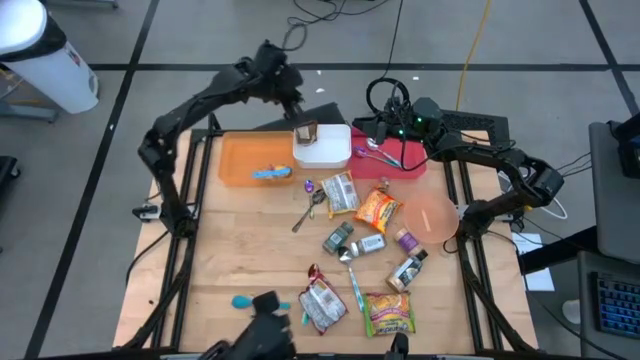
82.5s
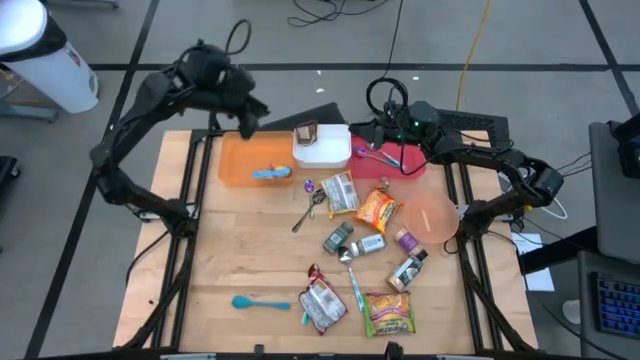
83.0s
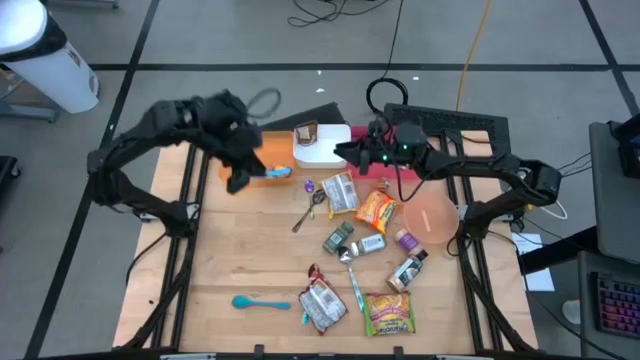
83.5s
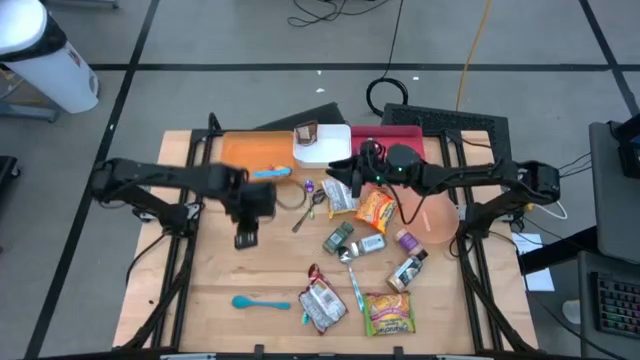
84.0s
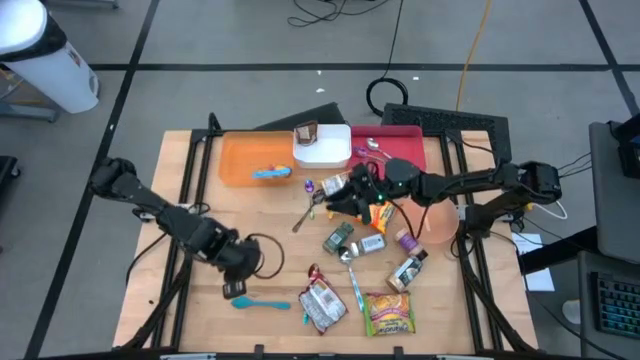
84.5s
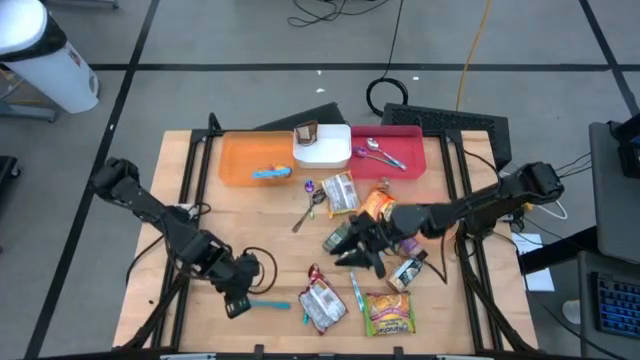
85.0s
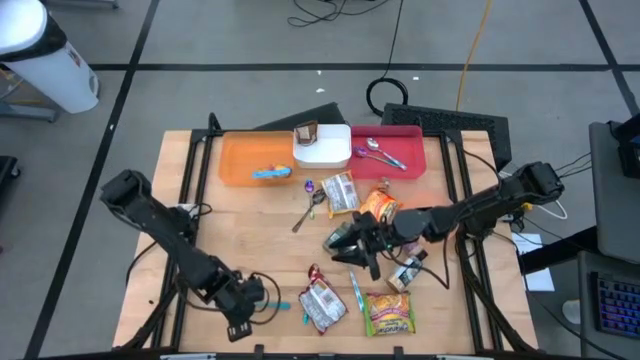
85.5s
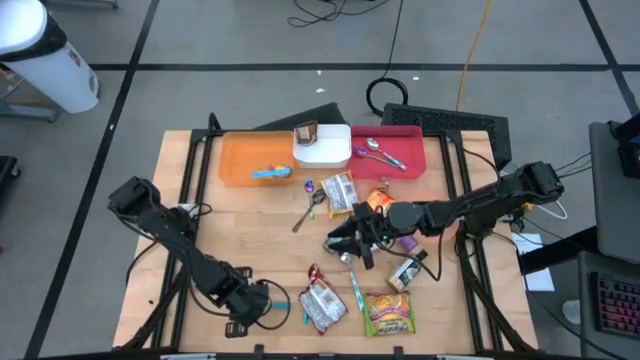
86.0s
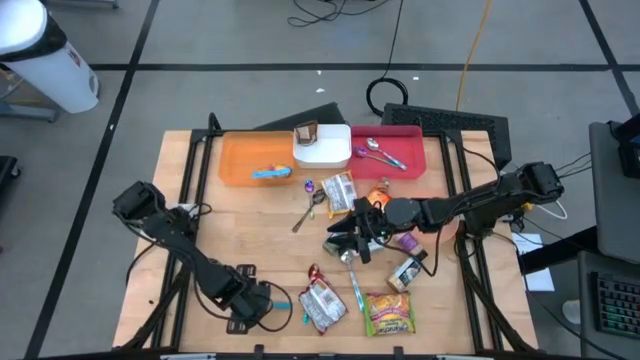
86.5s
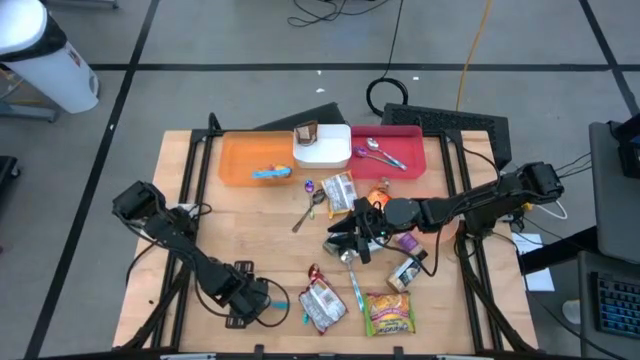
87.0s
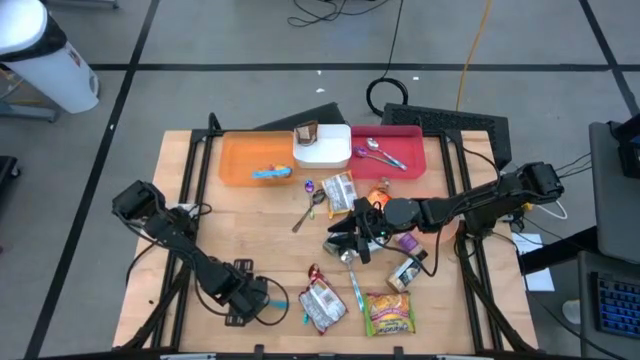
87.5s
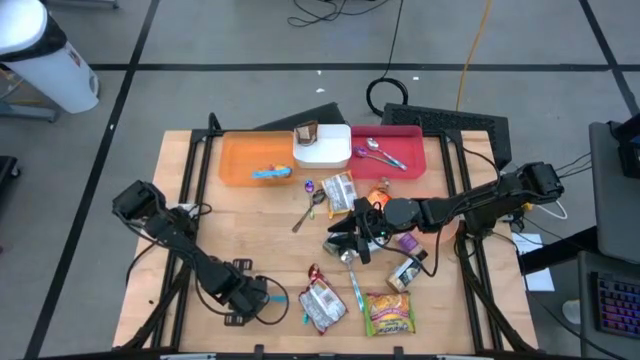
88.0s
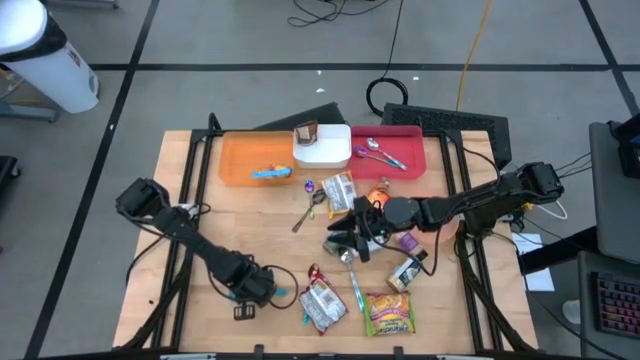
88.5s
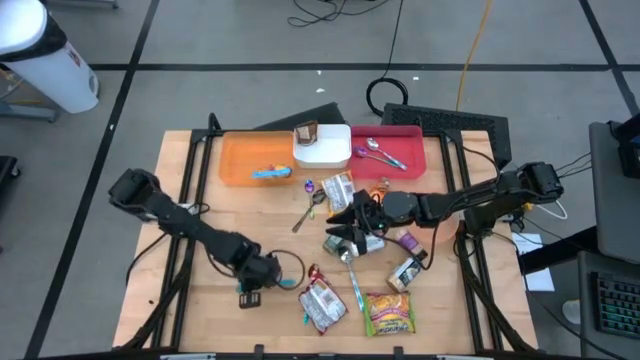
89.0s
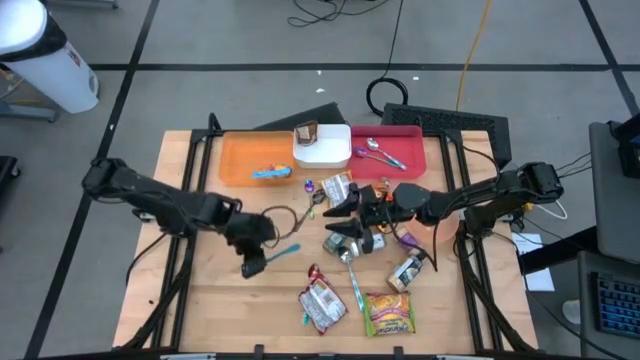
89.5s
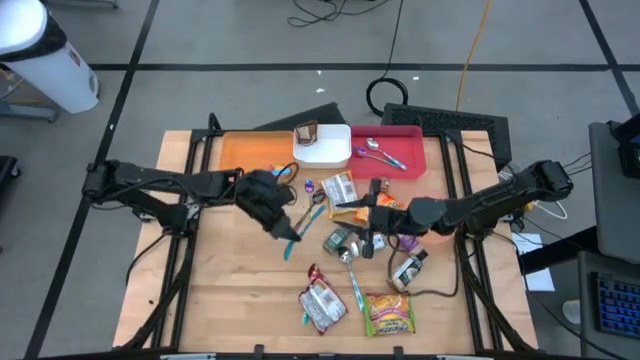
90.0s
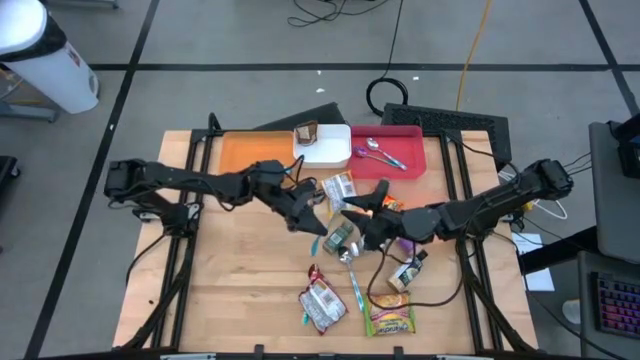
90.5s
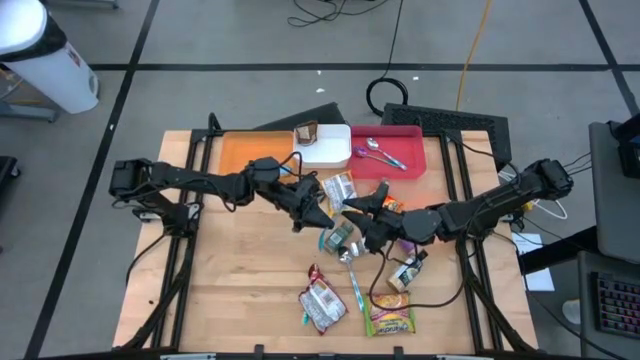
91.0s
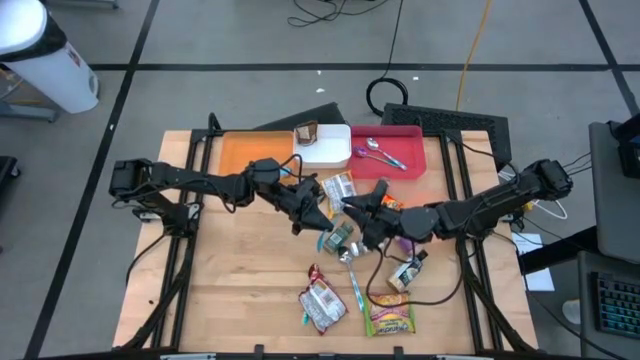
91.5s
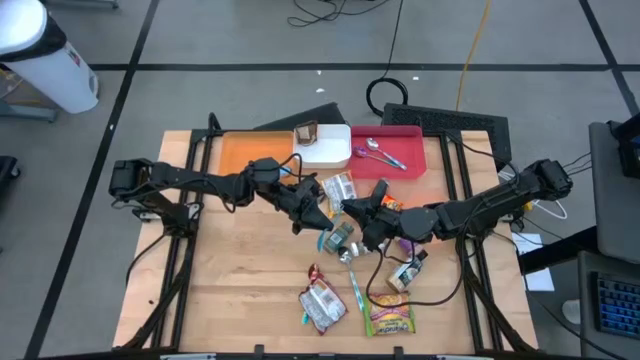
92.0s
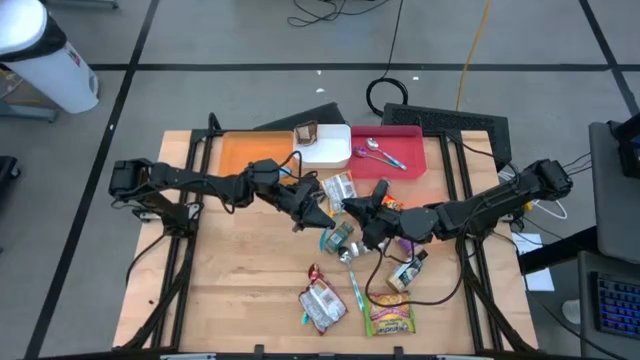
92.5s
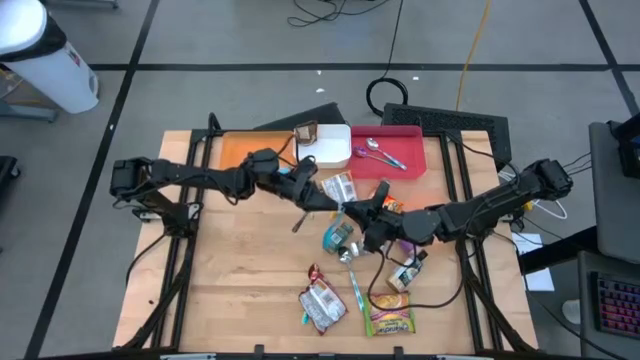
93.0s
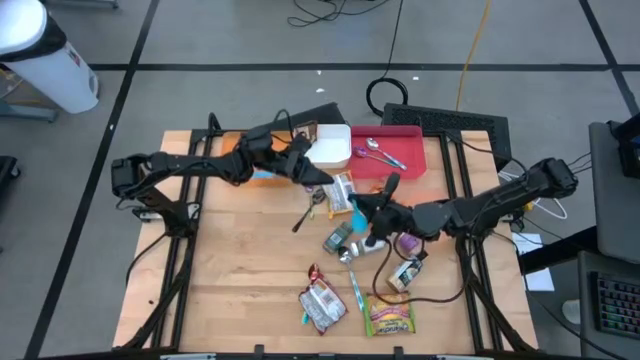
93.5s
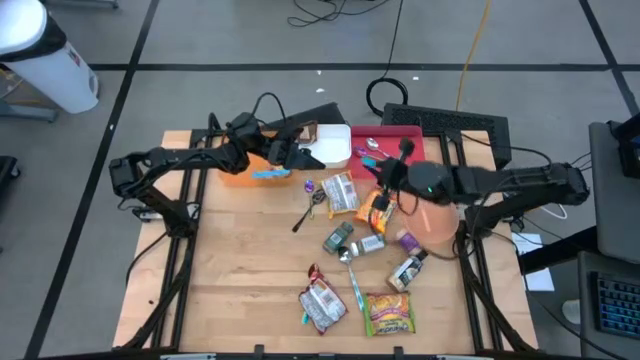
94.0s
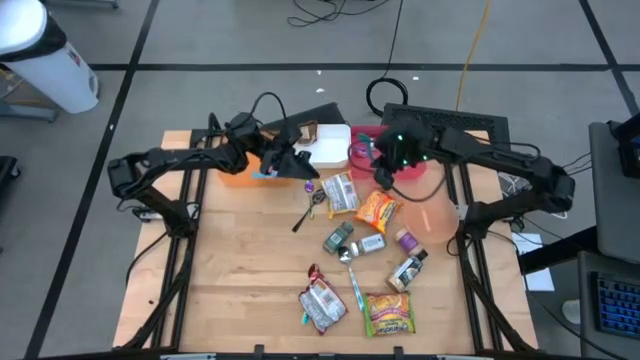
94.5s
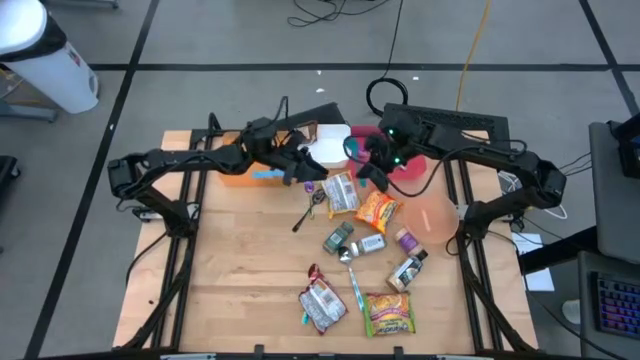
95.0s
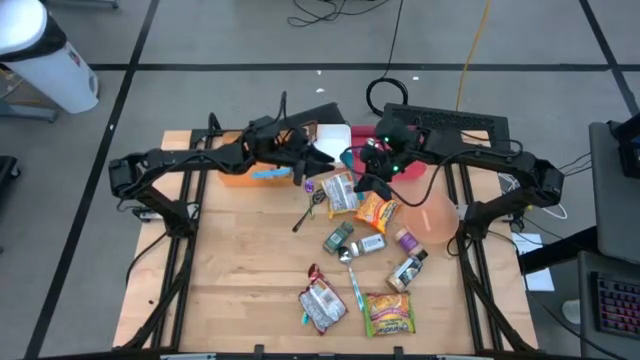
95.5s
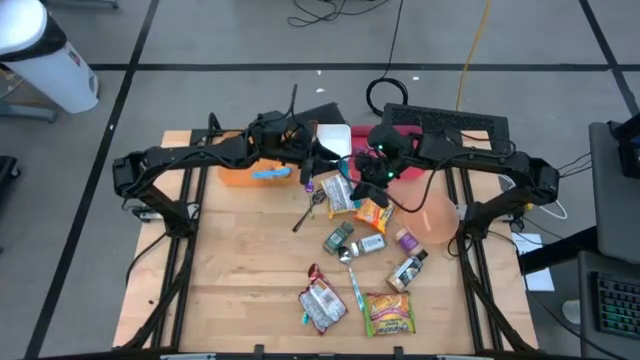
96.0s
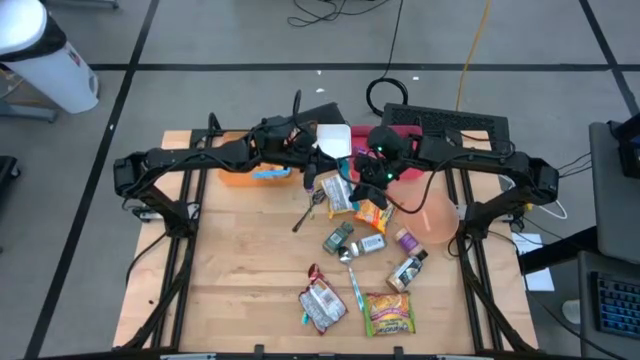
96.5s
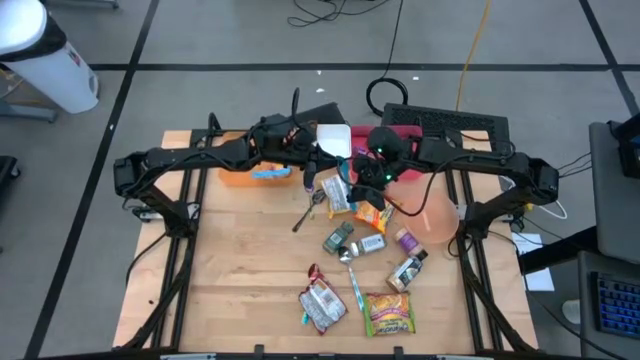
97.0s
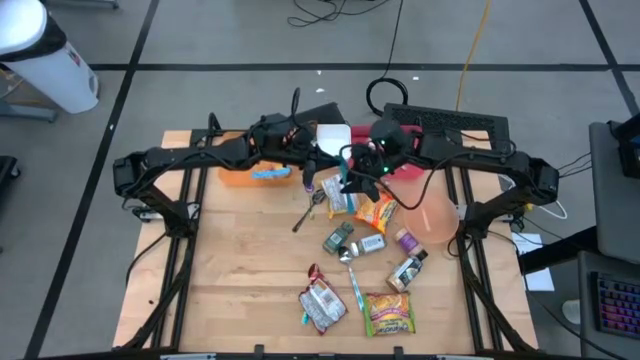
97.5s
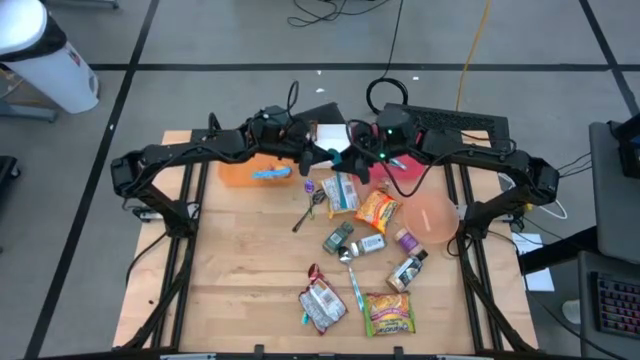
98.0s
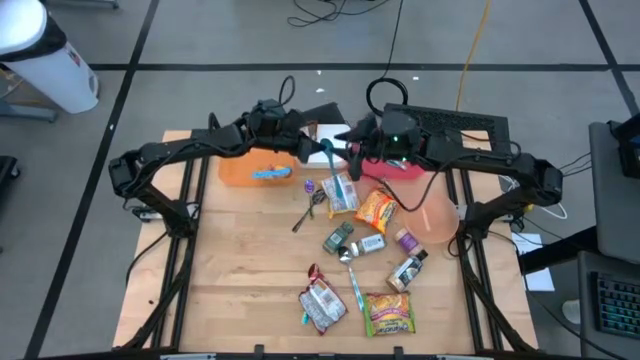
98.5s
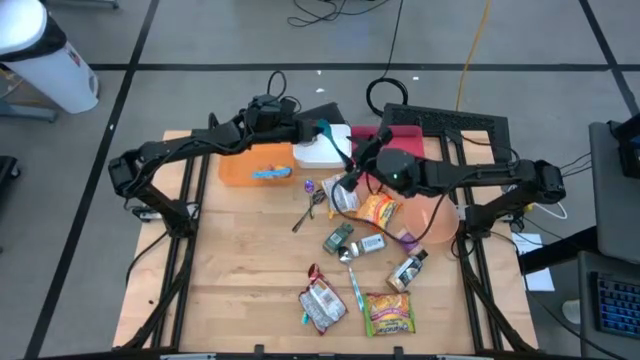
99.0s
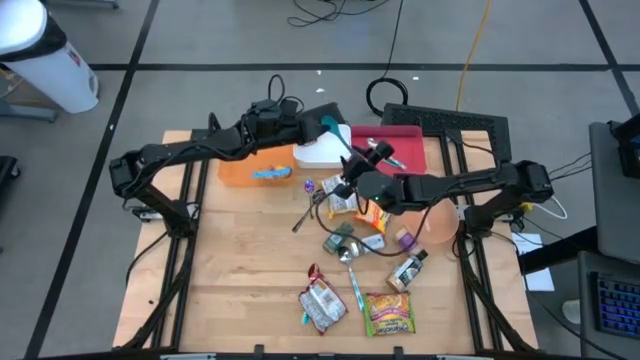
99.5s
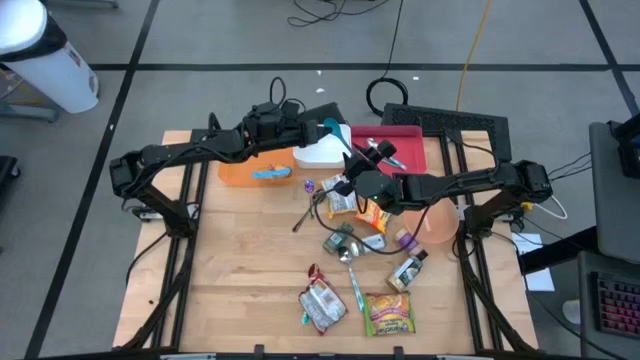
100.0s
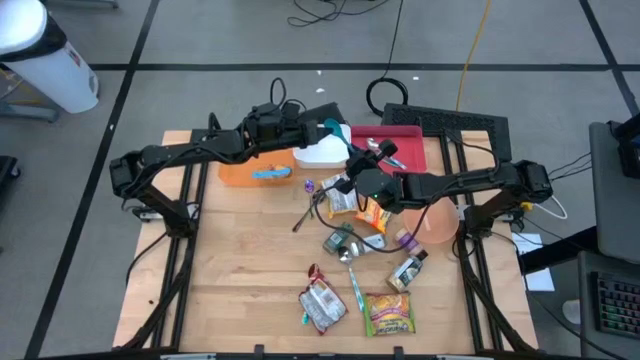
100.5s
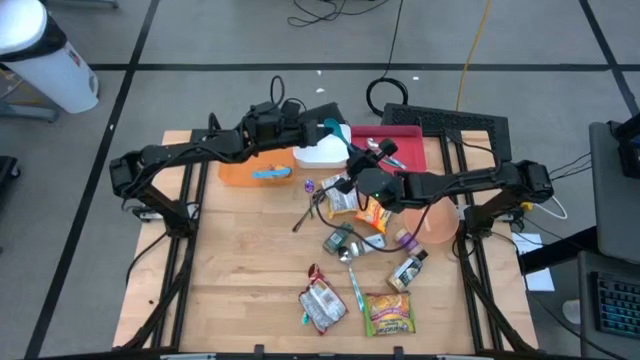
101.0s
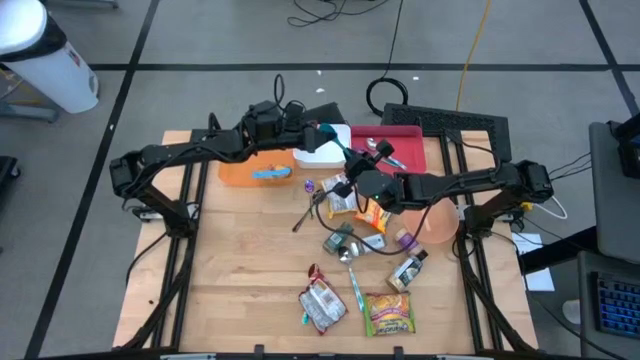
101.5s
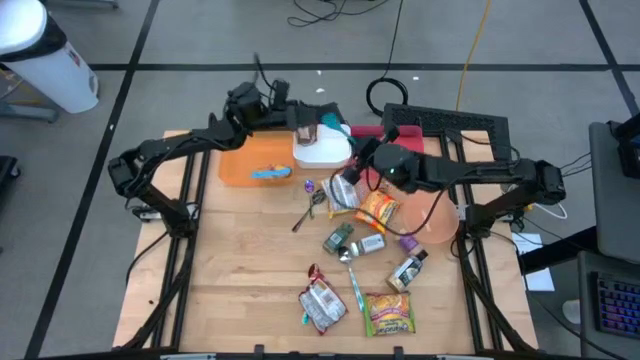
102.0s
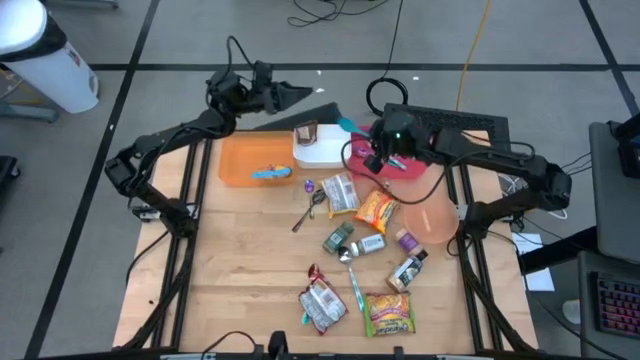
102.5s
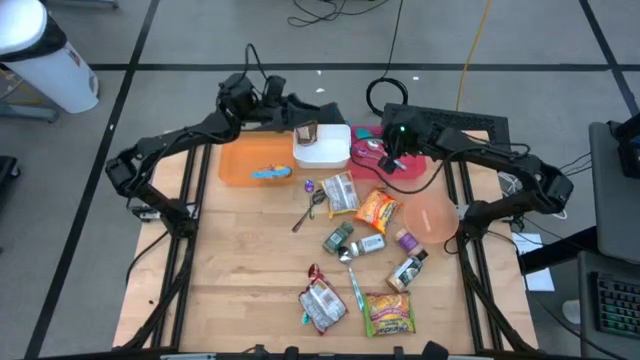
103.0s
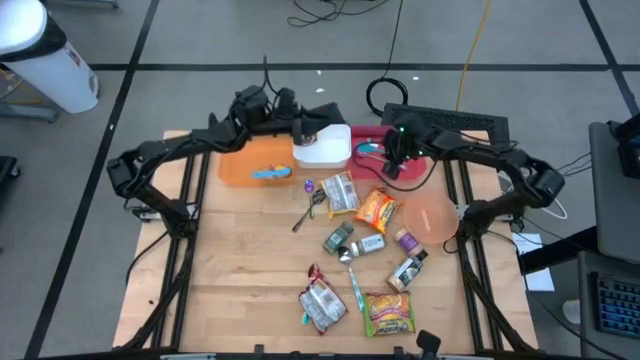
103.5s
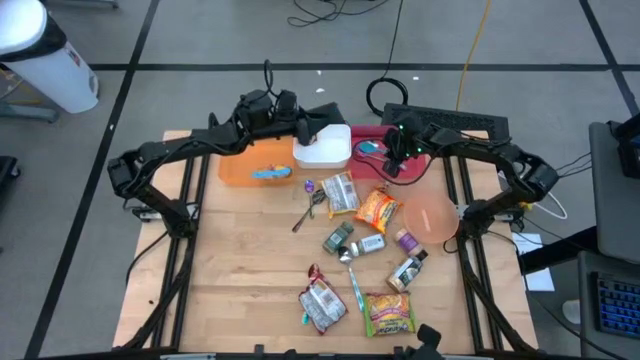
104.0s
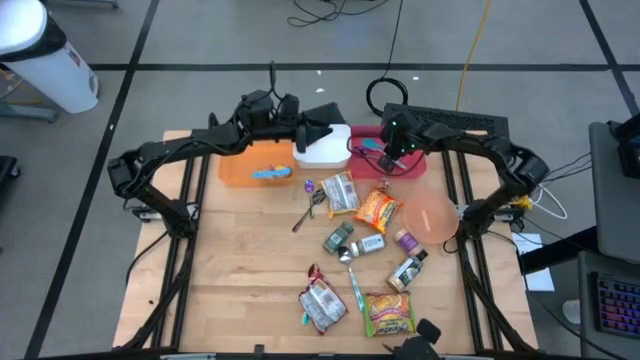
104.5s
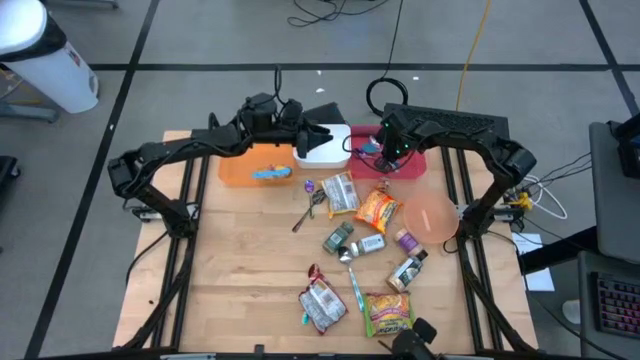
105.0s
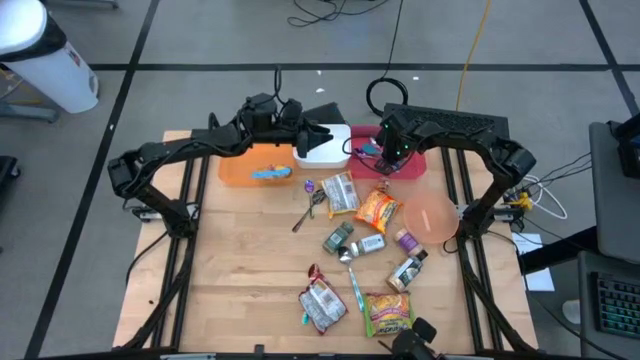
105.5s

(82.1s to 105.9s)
Task: Pick & Place Food Item
Put the blue baby spoon into the red bin
